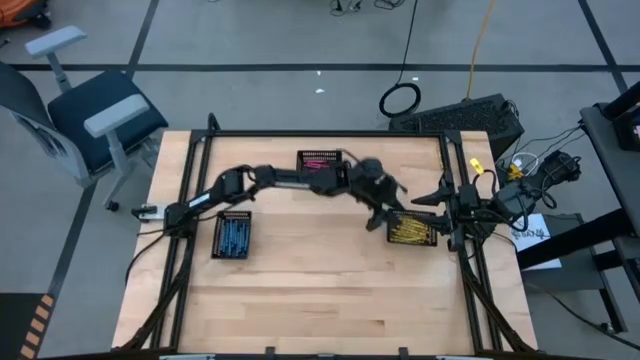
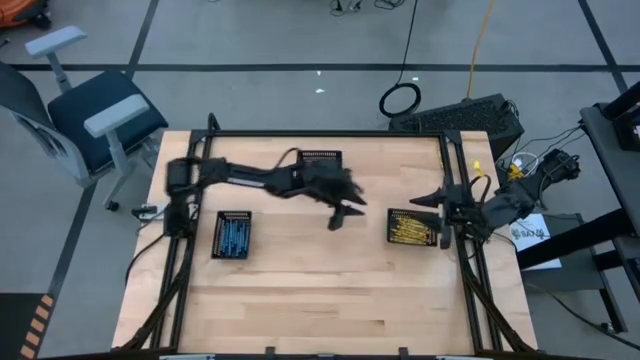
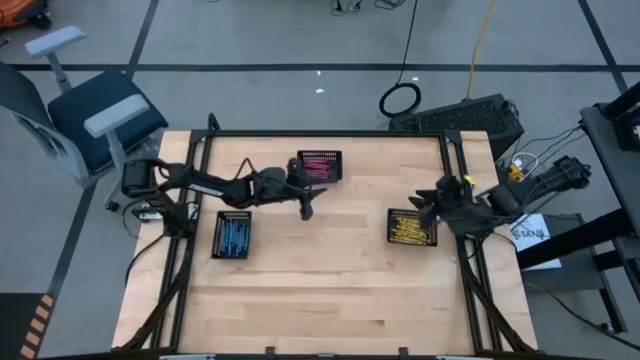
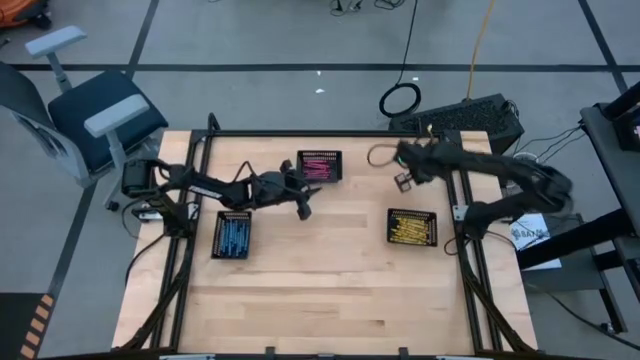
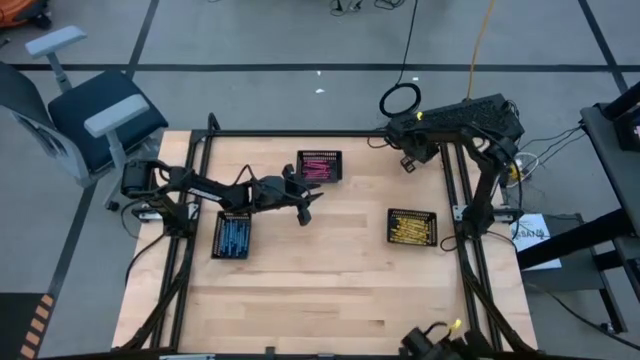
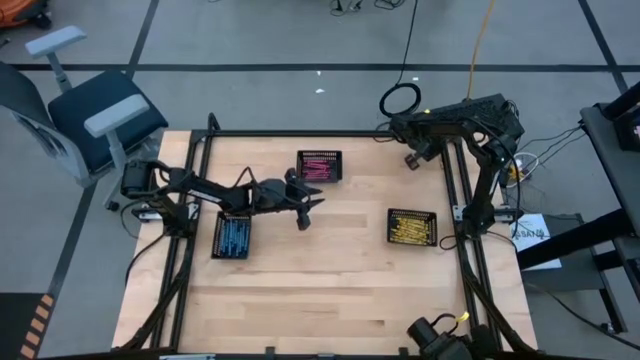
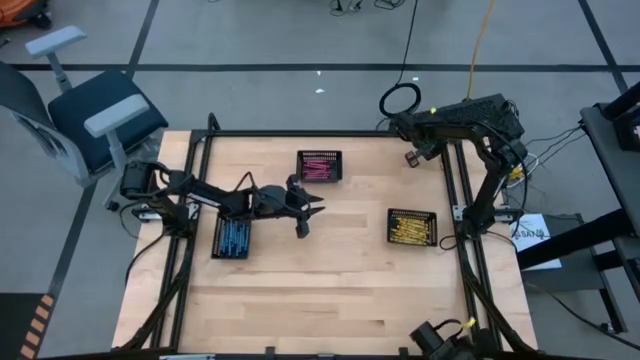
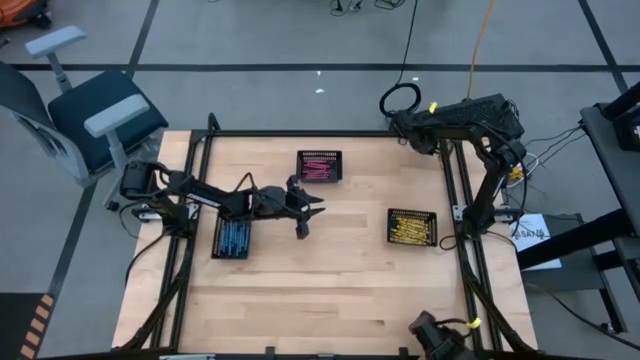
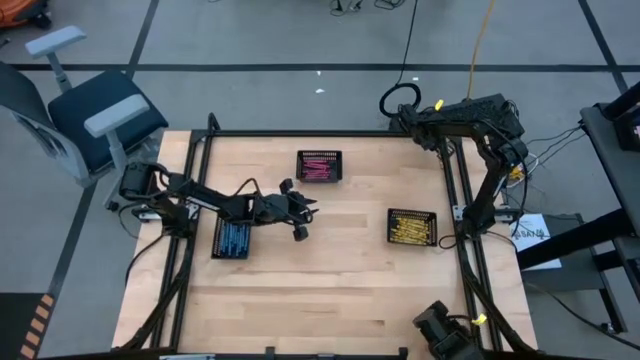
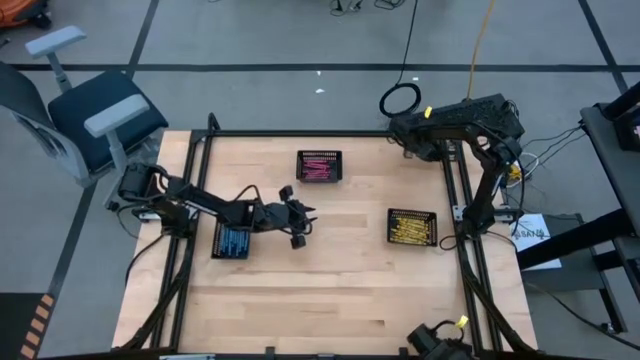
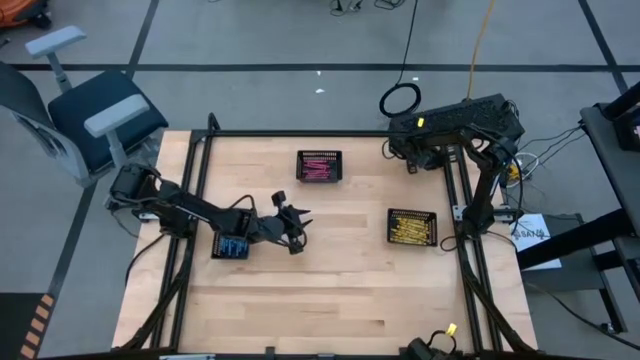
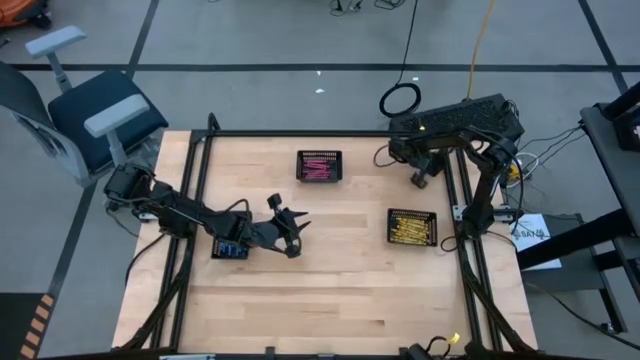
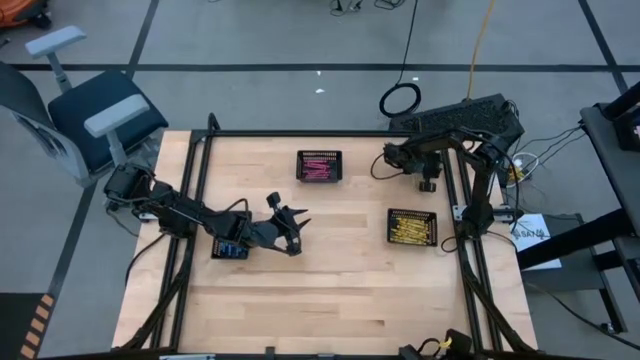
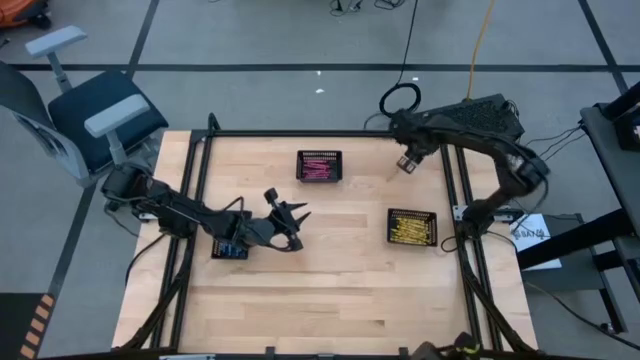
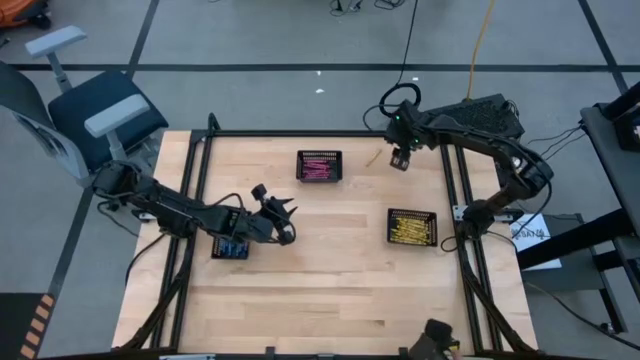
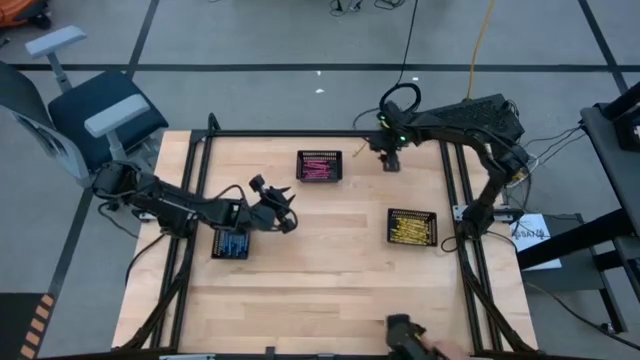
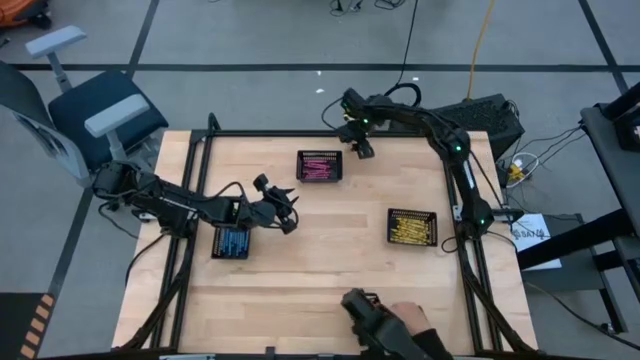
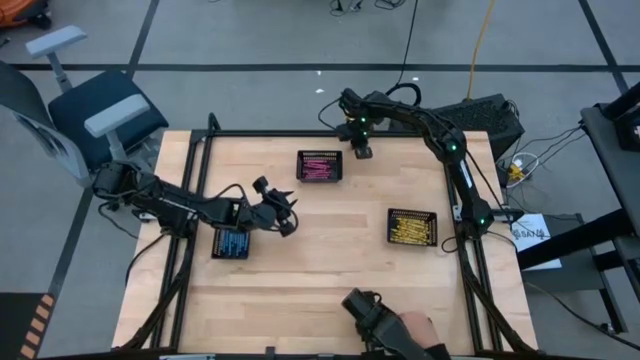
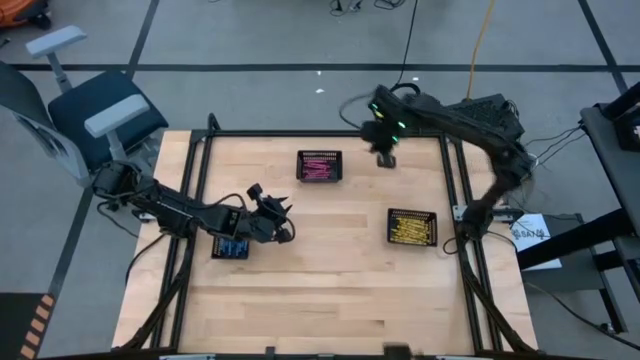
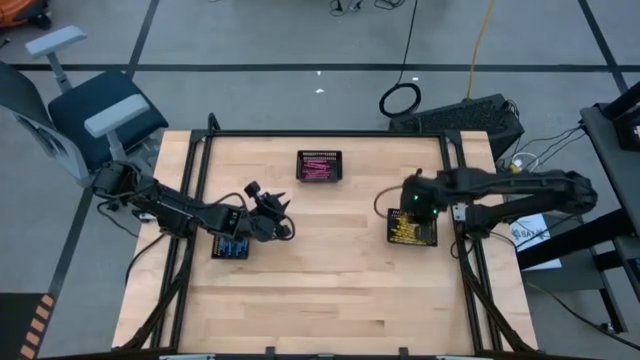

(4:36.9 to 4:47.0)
Task: Sort crayons
Put the yellow crayon into the bottom right black bin

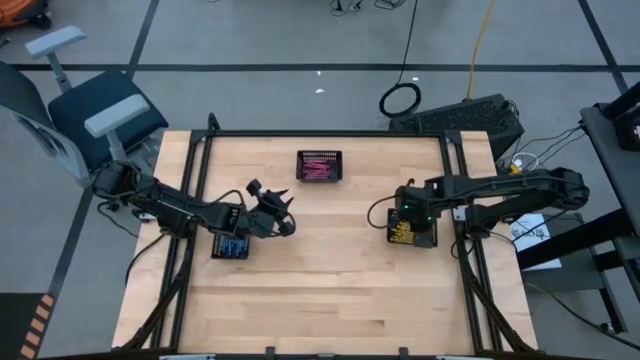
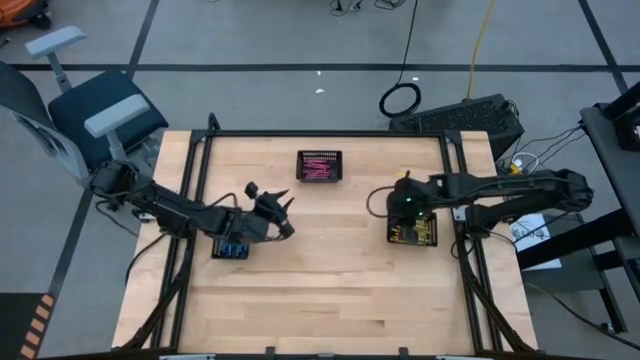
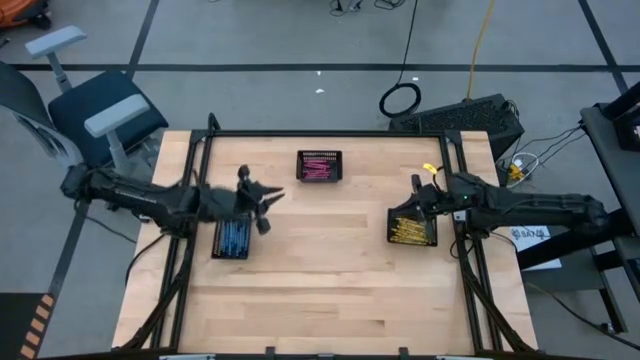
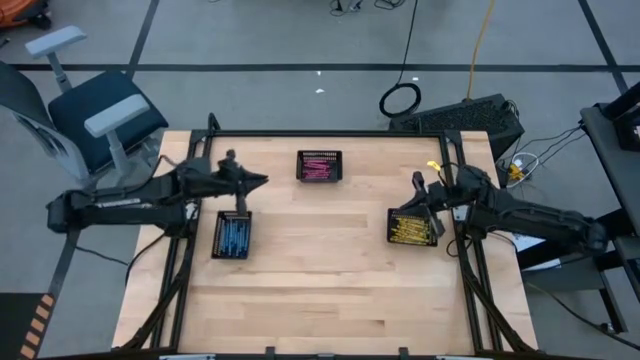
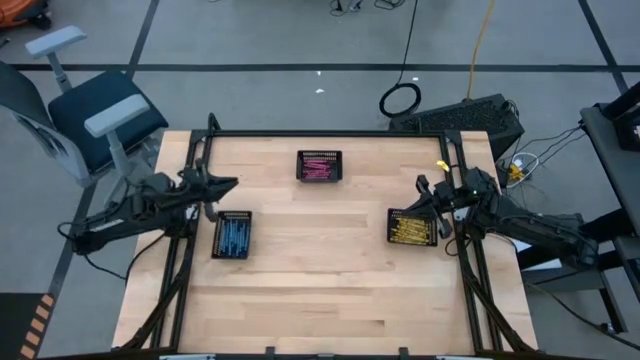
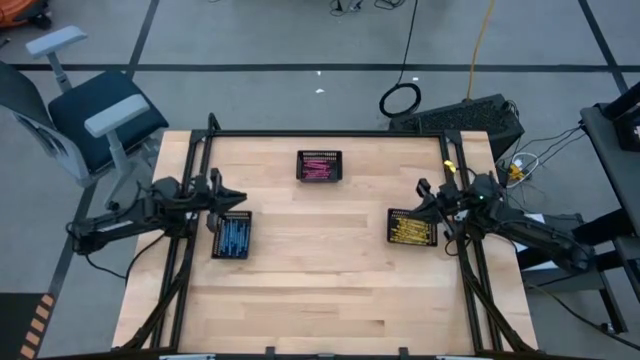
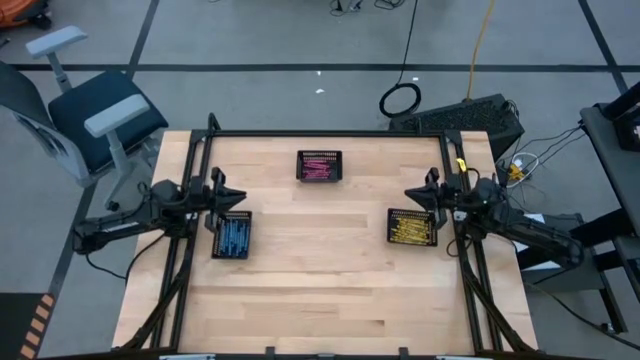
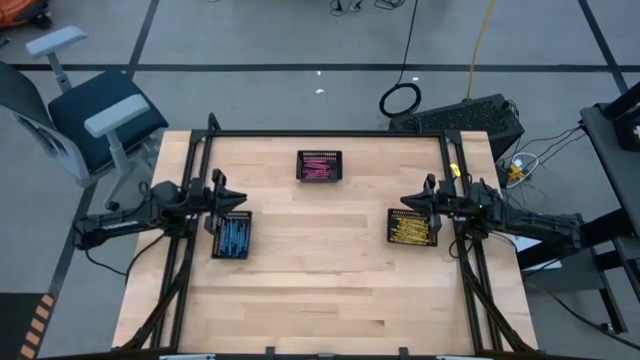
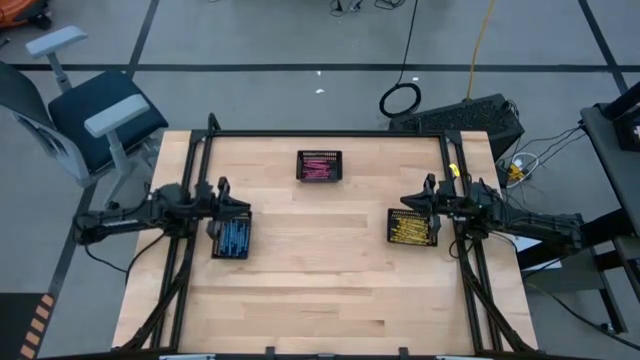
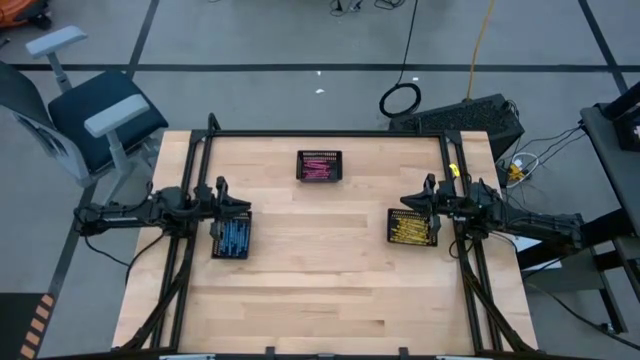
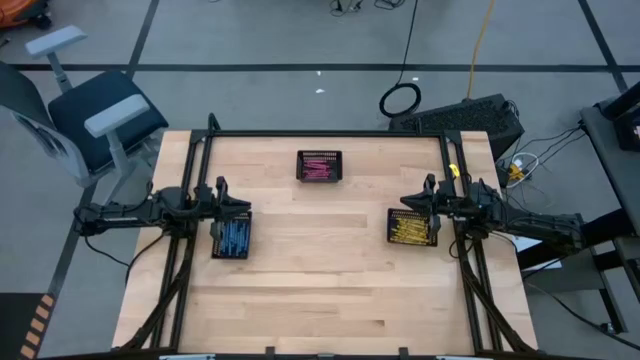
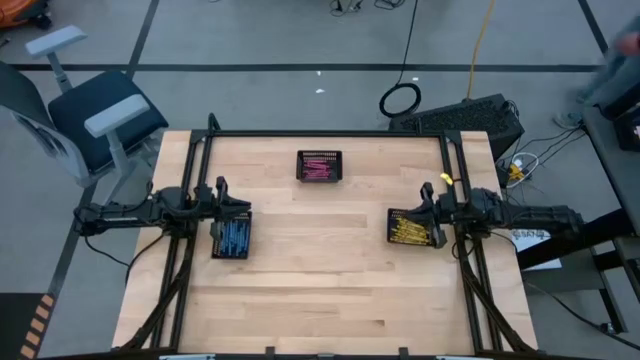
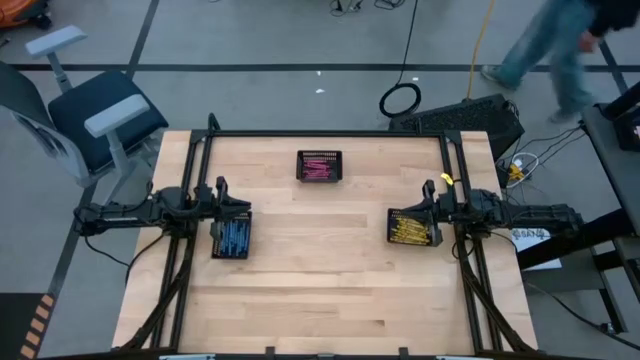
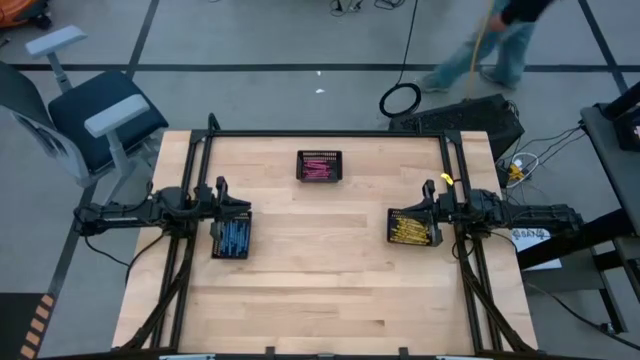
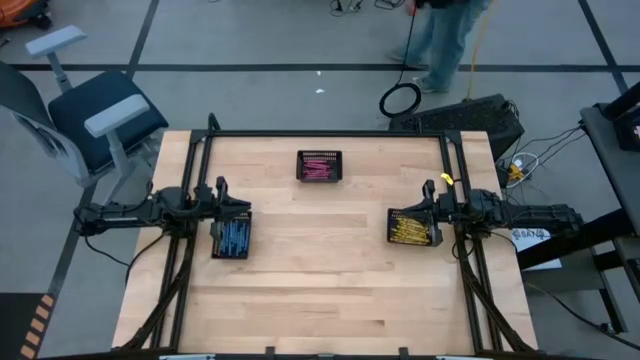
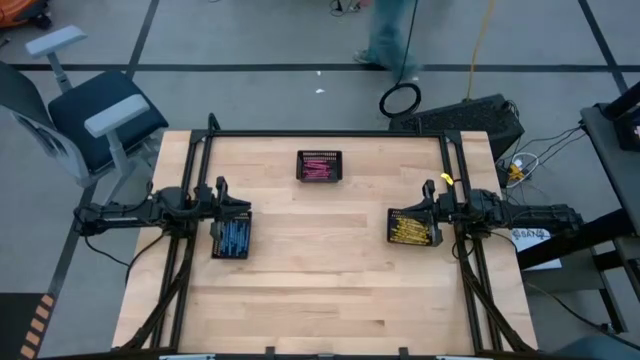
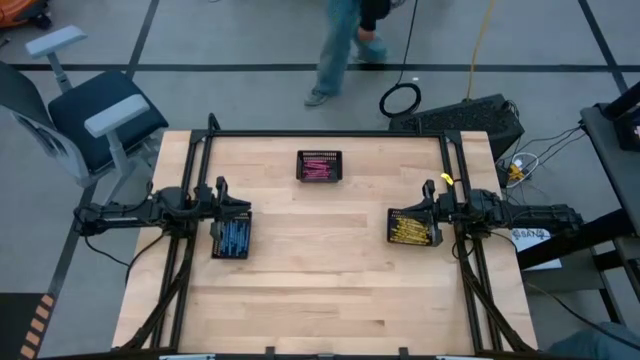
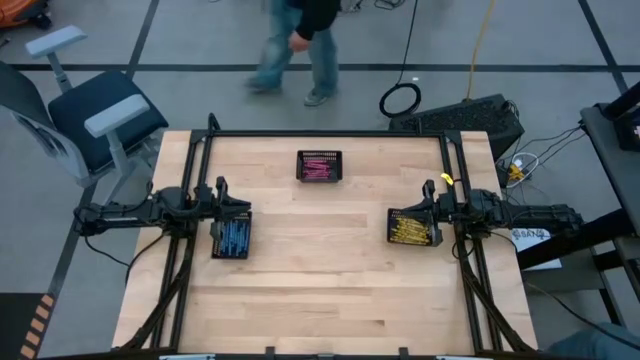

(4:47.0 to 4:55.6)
Return to Home Position

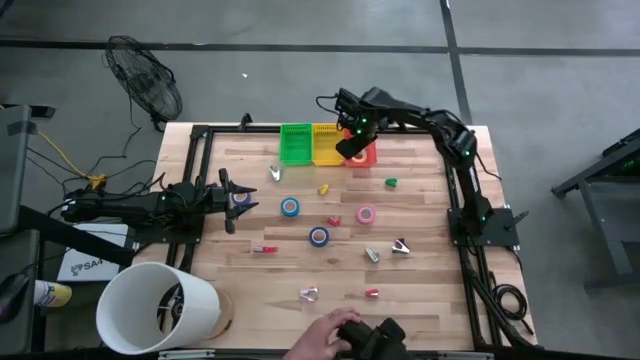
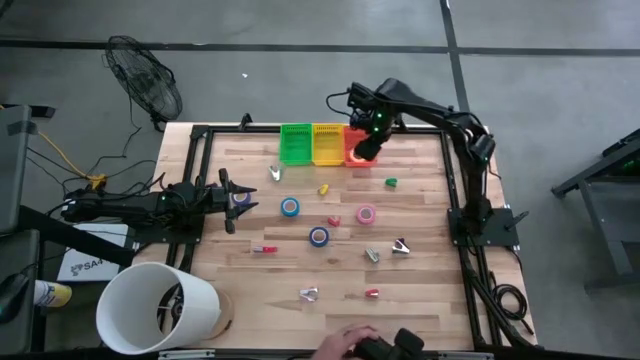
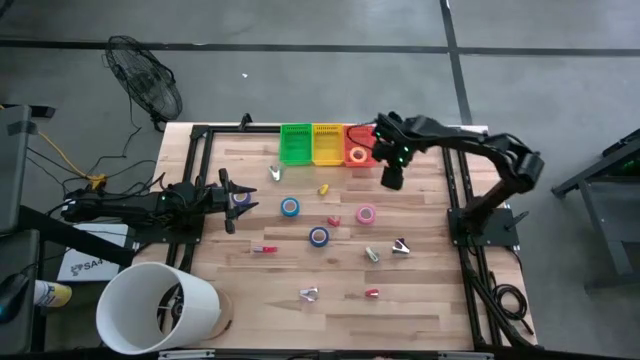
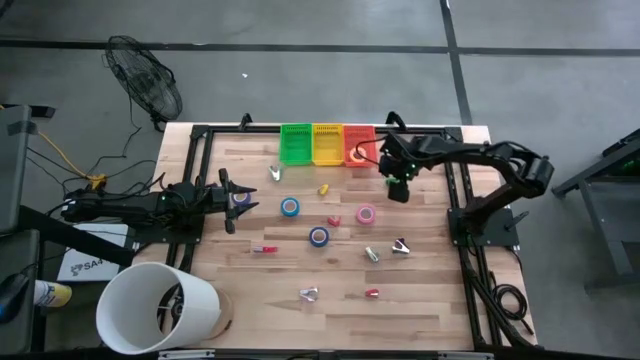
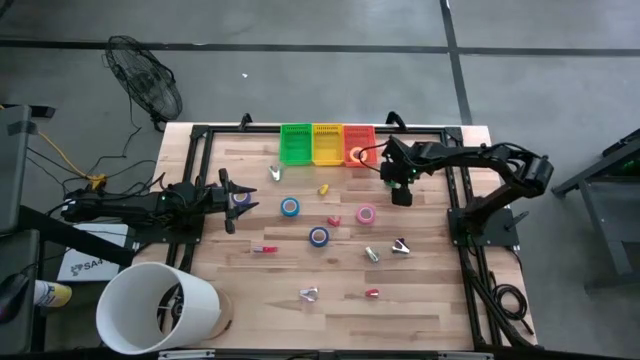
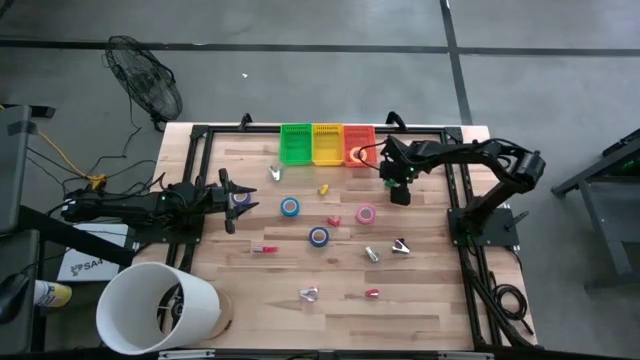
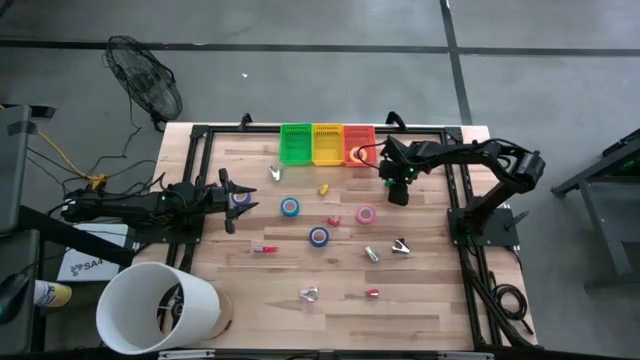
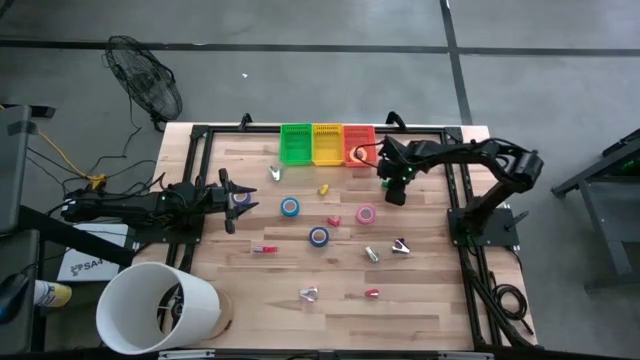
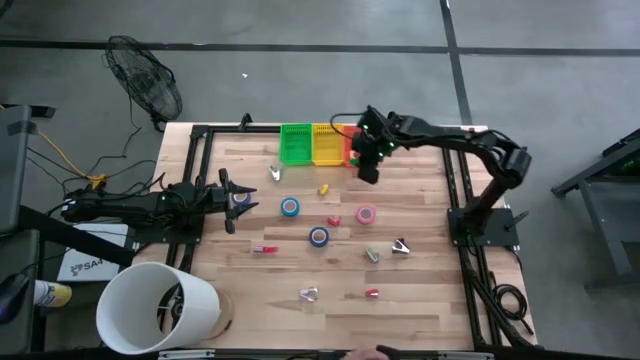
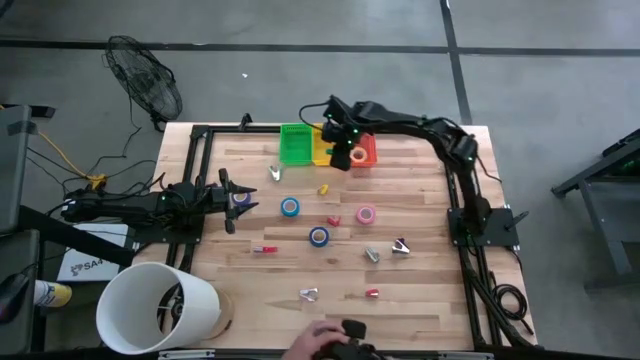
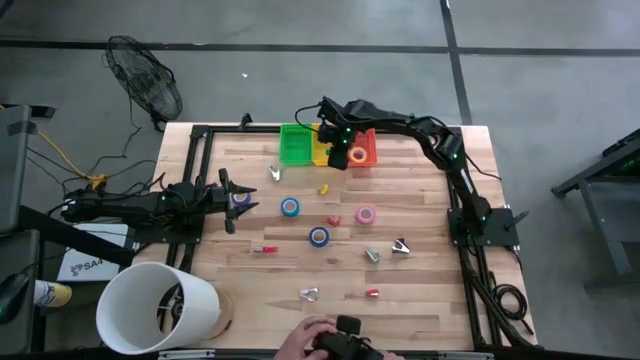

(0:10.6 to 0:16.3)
Task: Pick and place Stapler, Stapler remover, tape
Put the green stapler into the yellow bin
